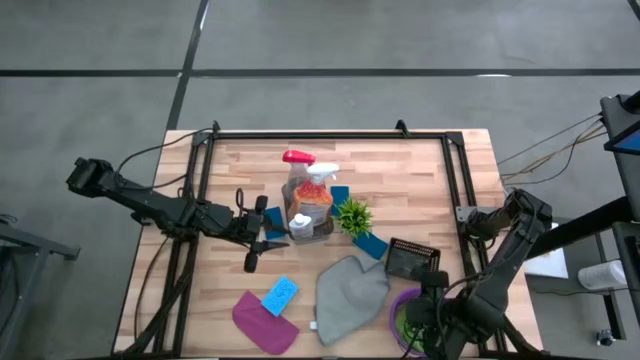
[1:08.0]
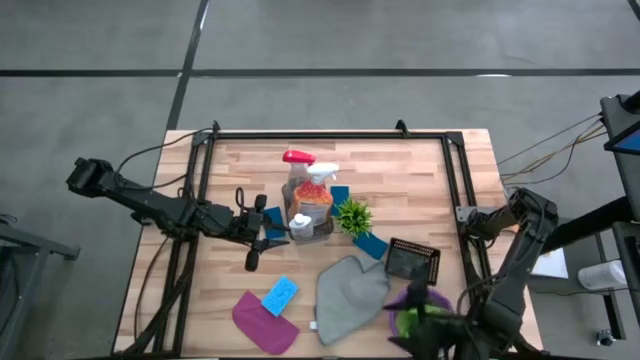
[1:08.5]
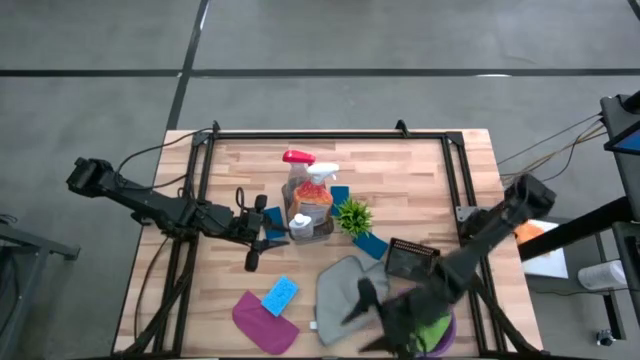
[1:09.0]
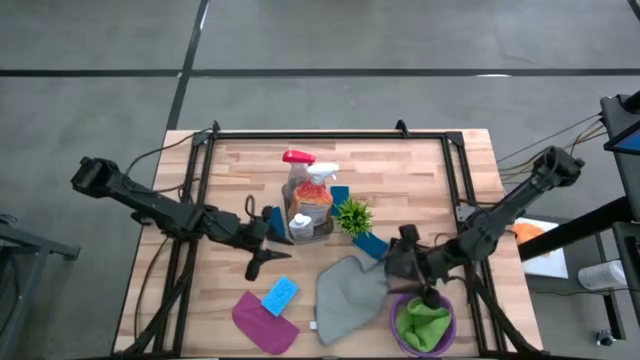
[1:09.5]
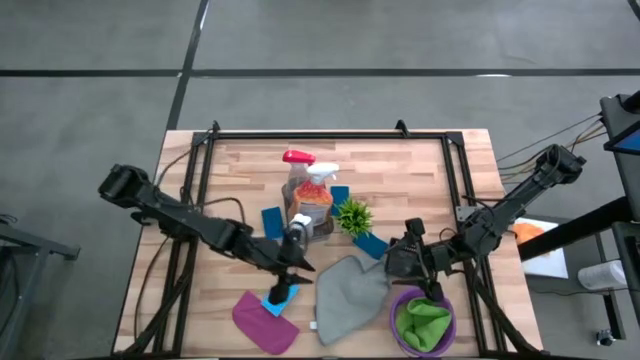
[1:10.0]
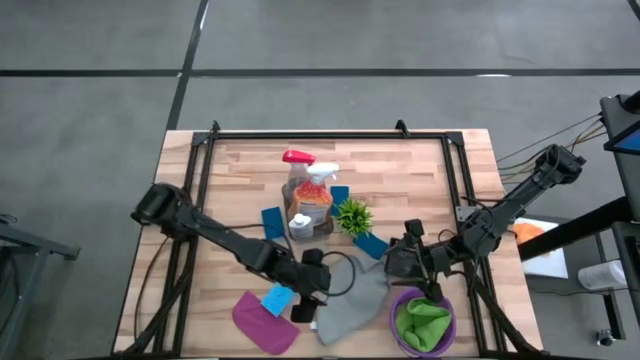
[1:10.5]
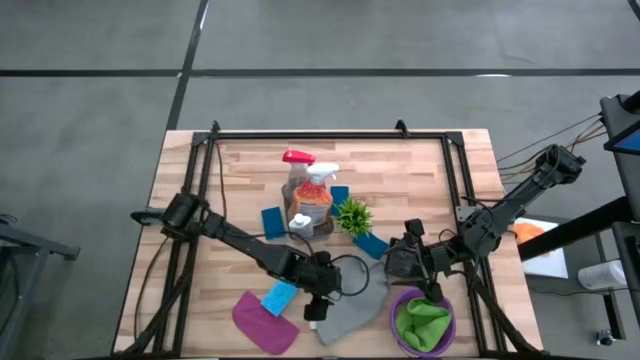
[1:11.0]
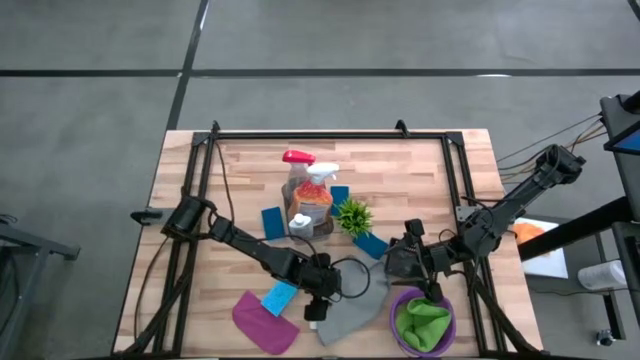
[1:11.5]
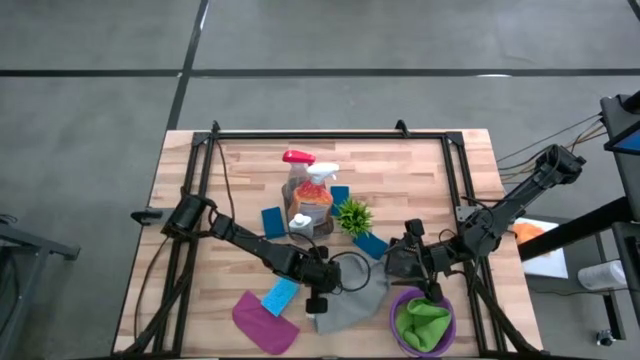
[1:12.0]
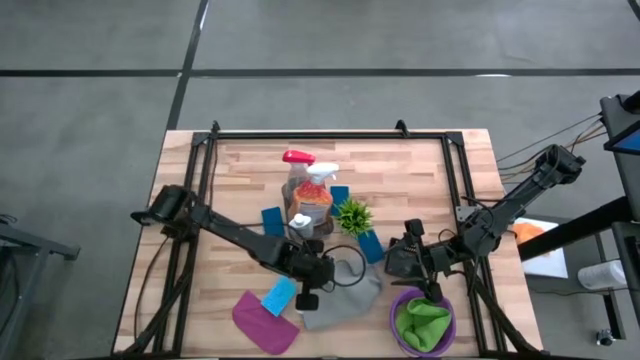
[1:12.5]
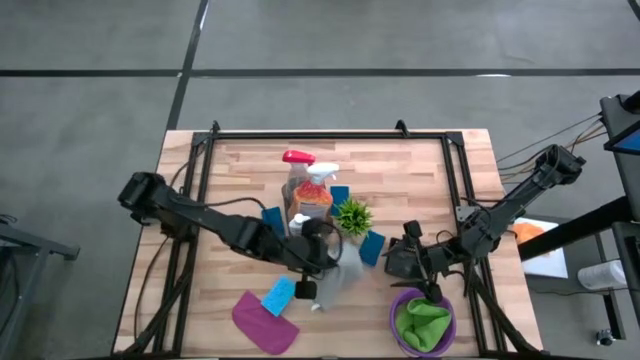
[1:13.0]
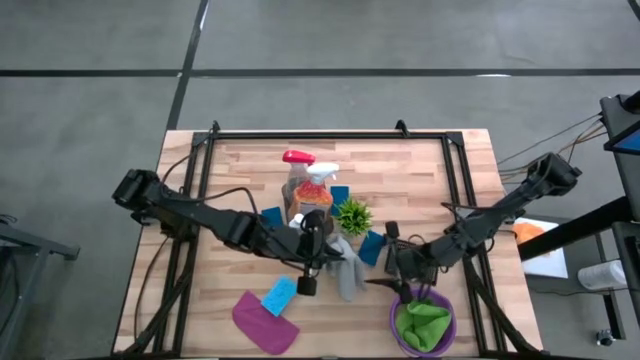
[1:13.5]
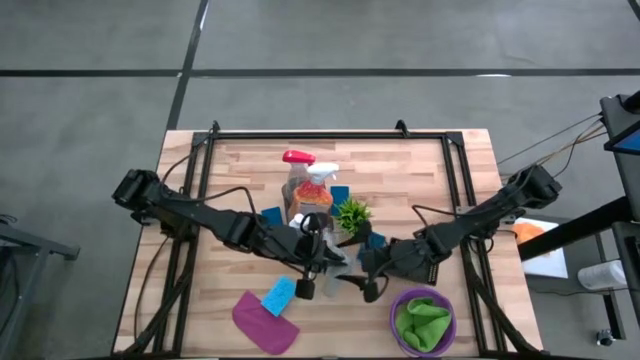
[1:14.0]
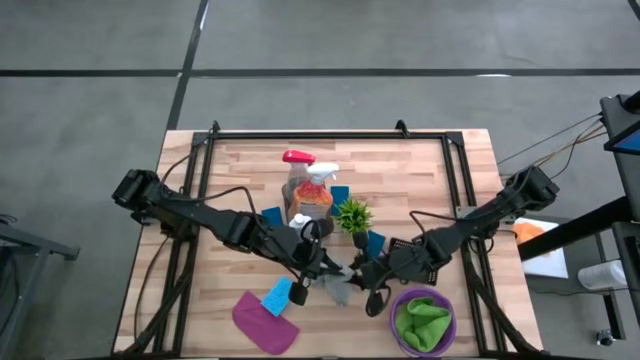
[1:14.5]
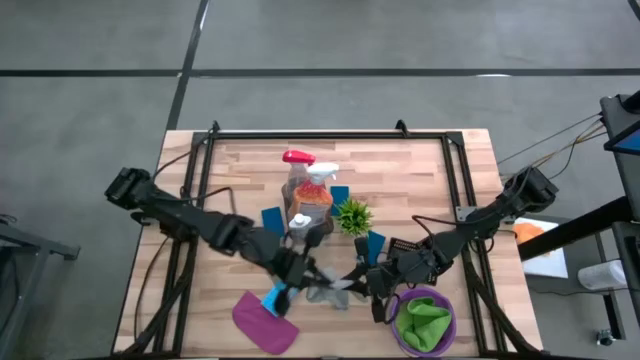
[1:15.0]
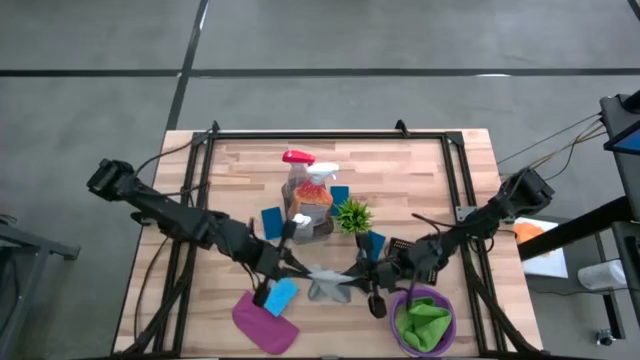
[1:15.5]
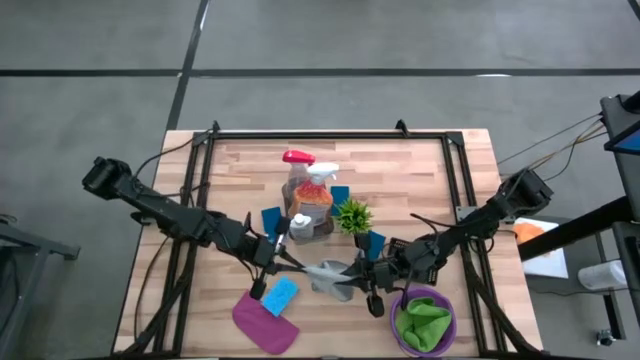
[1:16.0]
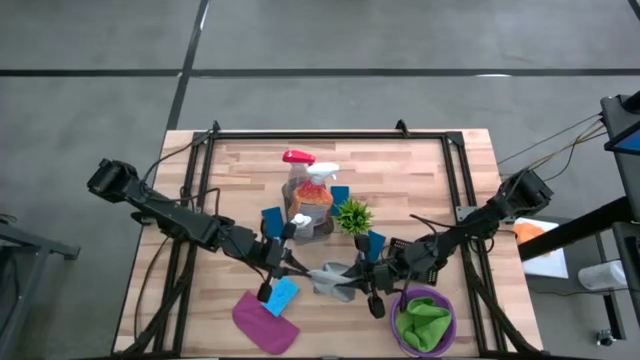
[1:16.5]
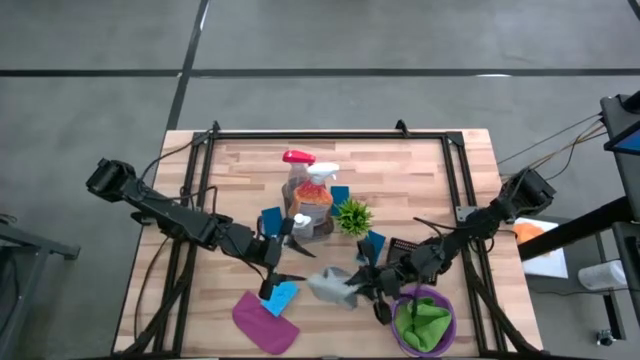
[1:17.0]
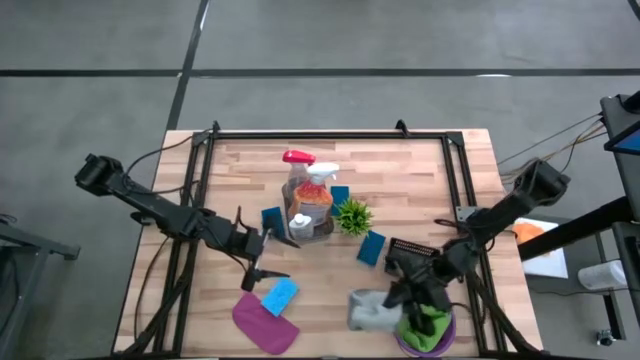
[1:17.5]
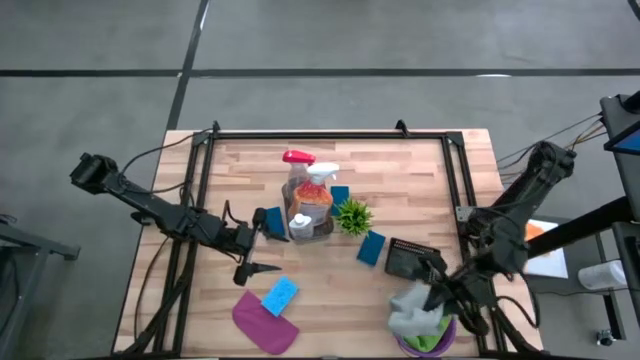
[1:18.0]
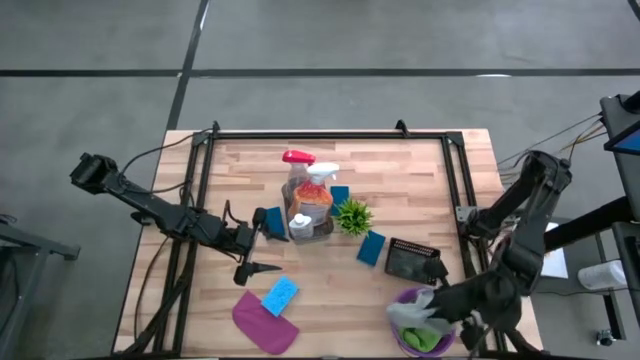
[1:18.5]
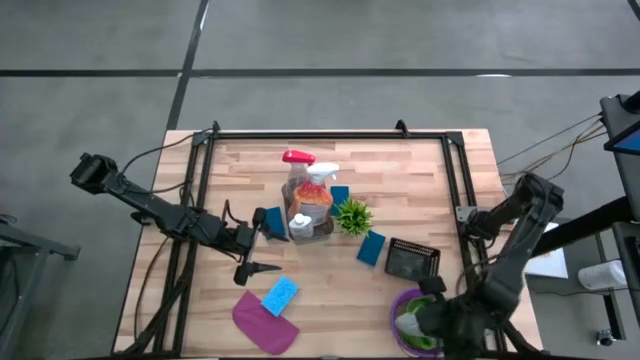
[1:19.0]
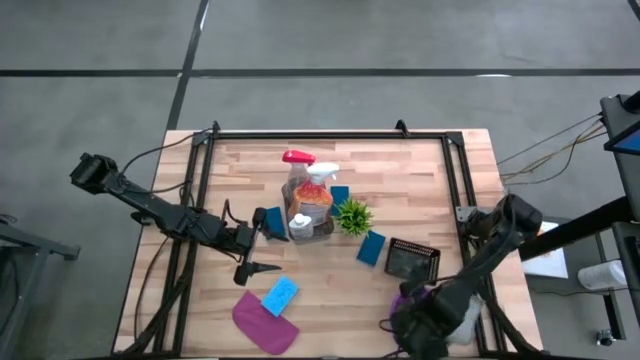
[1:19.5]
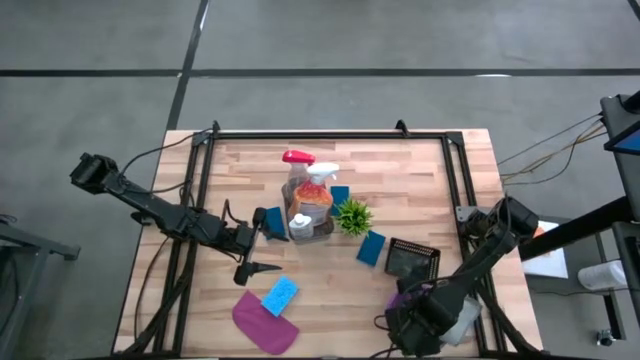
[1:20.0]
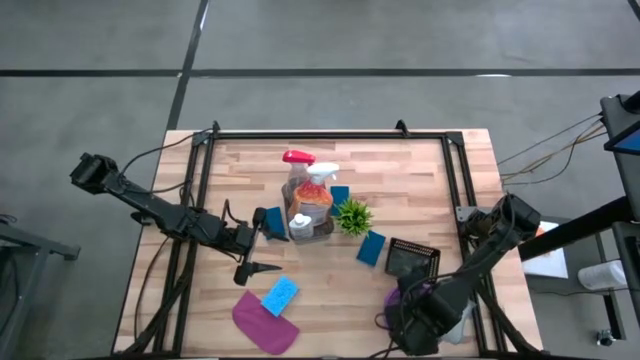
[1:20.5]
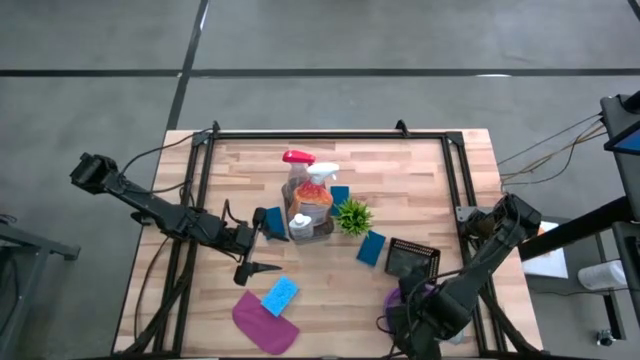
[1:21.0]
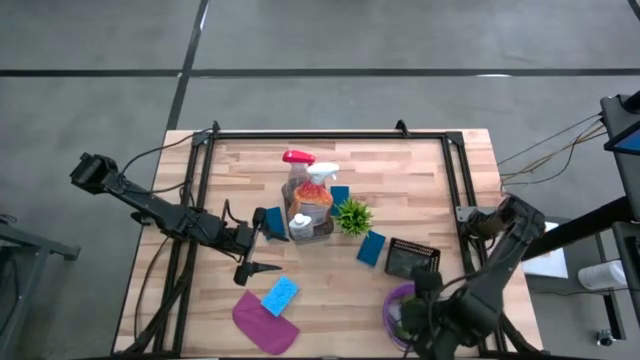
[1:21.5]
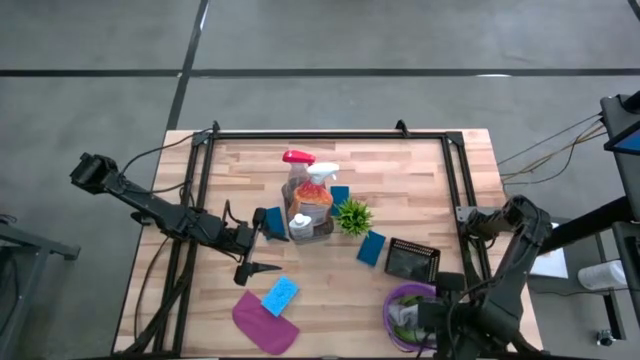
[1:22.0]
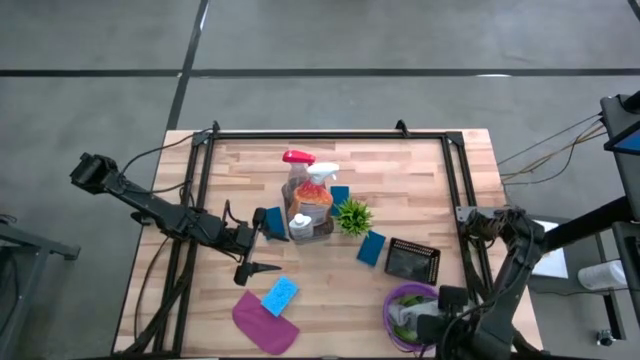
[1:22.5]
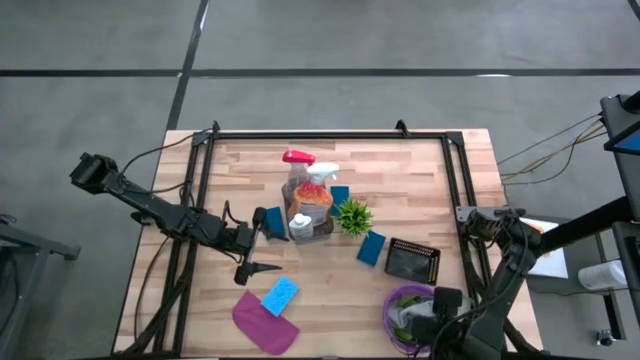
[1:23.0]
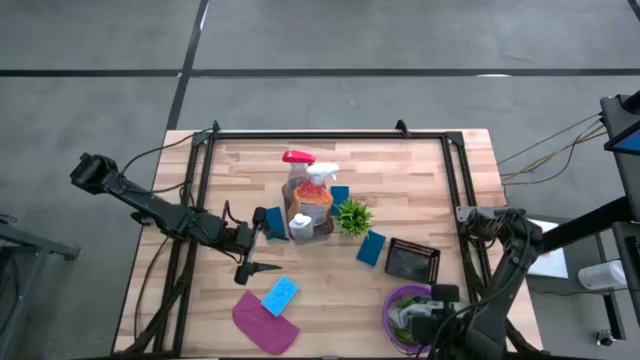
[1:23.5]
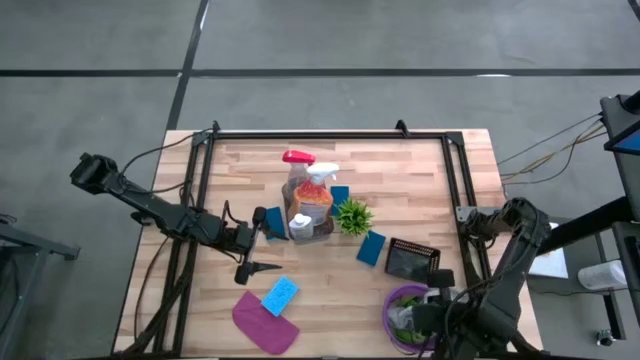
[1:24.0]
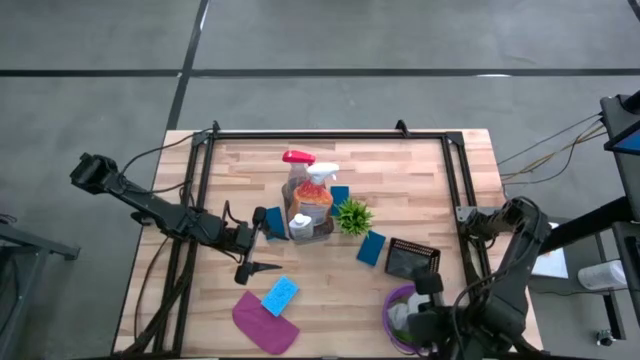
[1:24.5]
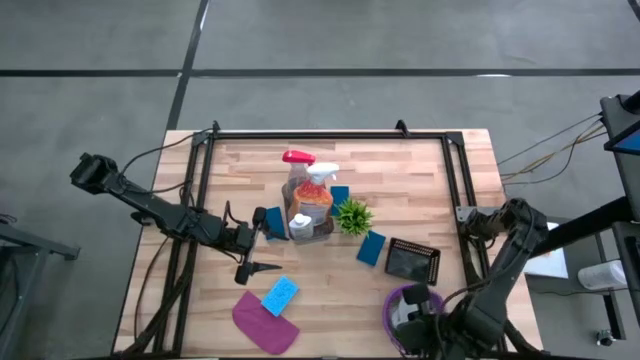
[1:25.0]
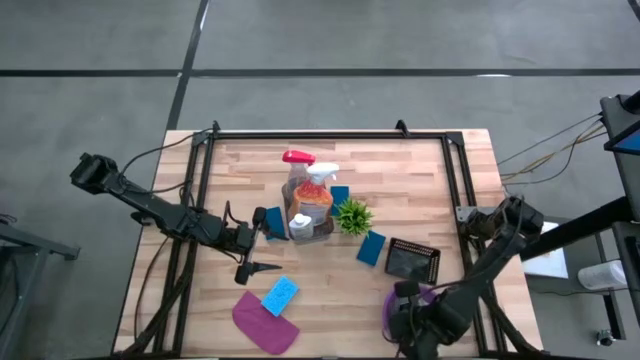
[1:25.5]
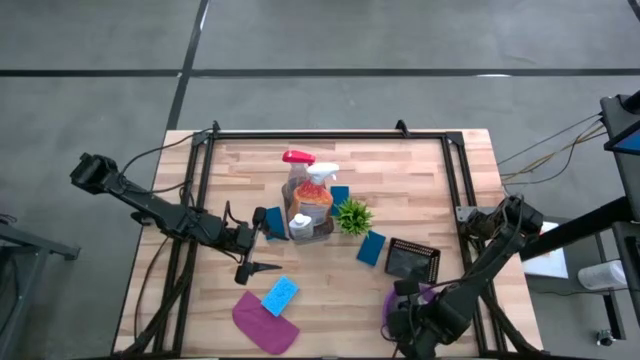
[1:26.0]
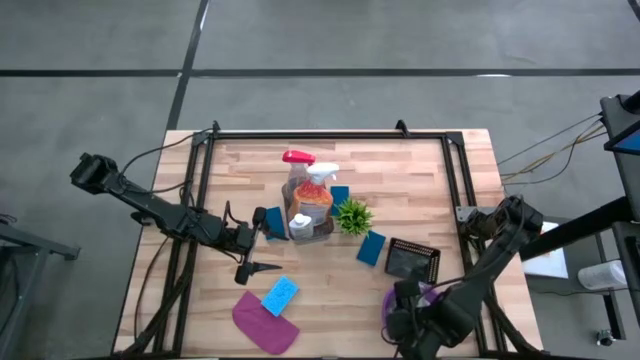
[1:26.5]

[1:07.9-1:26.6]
Task: Pick & Place Kitchen Items
Put the gray towel into the purple bucket

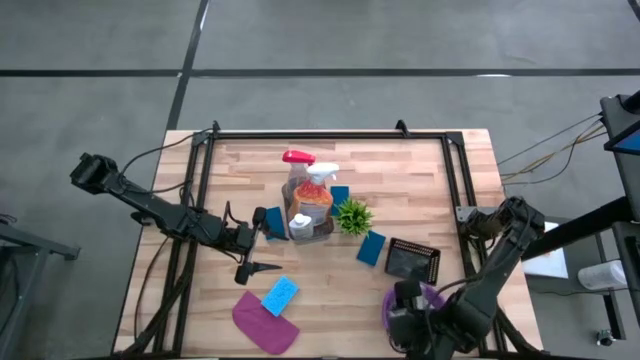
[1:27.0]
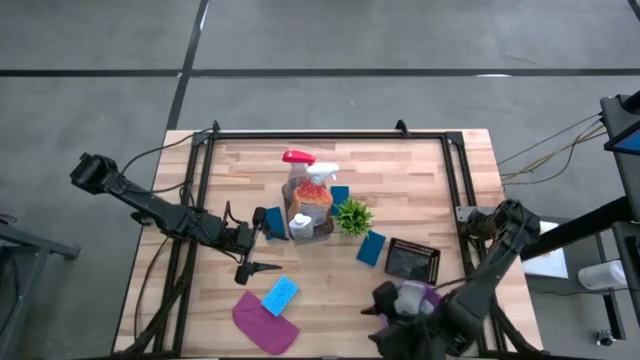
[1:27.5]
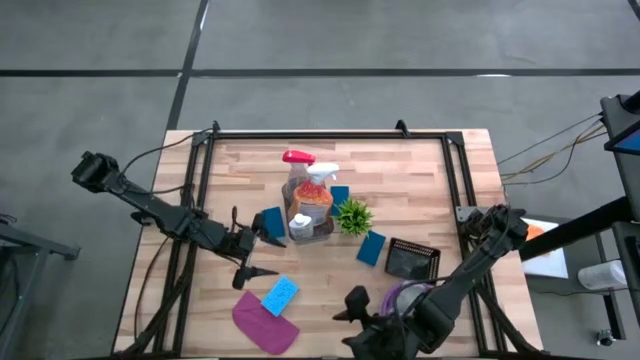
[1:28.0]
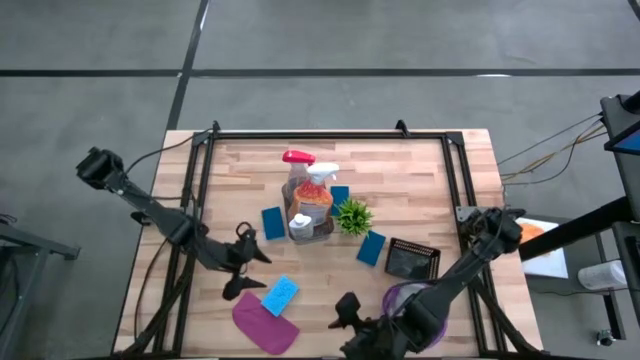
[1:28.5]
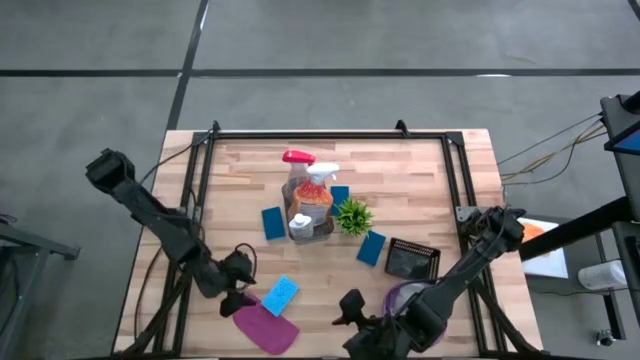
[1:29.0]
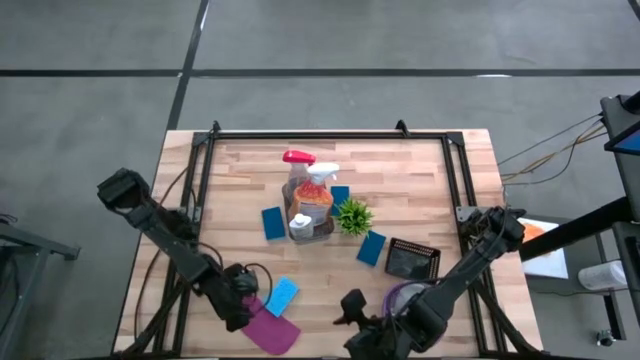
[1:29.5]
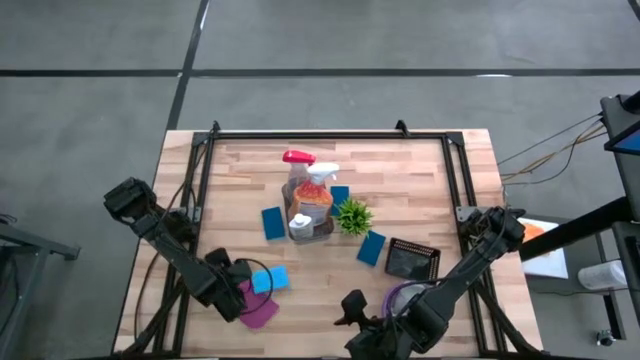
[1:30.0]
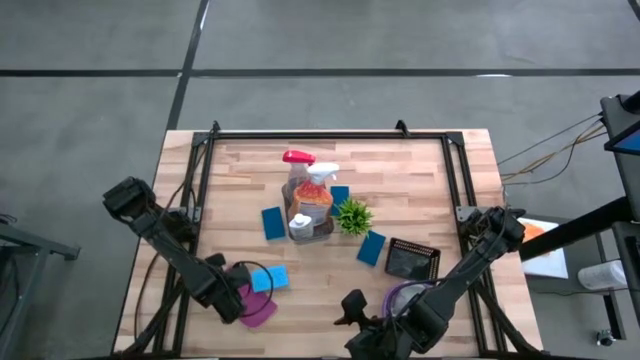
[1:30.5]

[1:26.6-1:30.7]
Put the purple towel into the purple bucket
